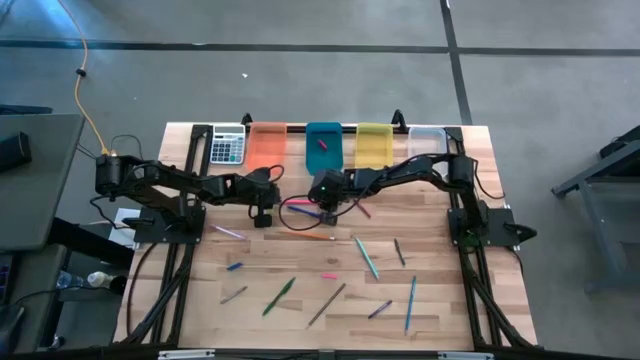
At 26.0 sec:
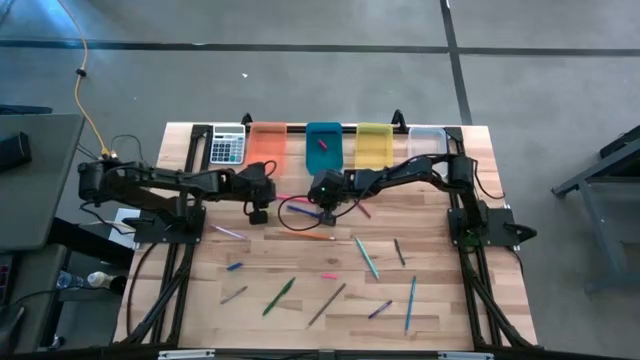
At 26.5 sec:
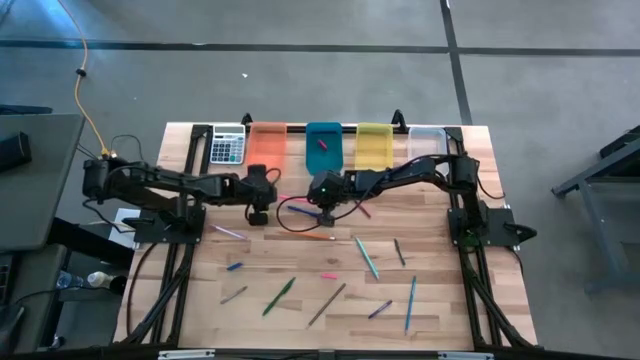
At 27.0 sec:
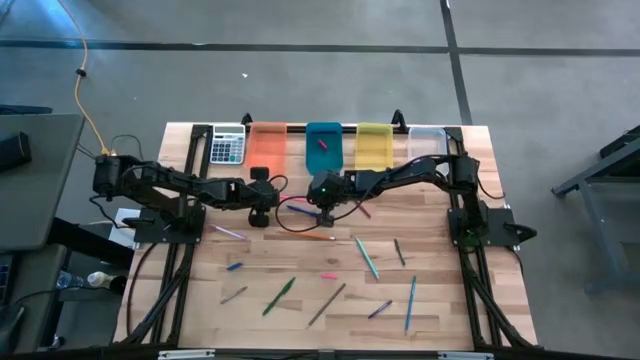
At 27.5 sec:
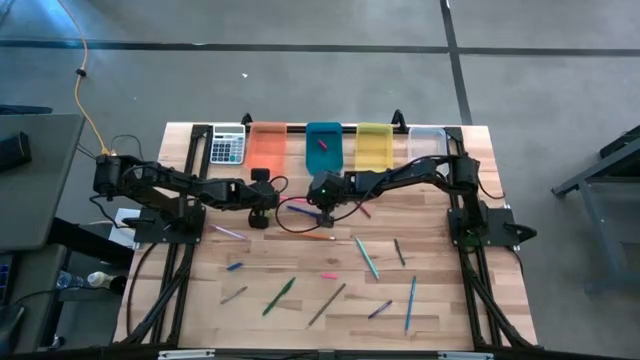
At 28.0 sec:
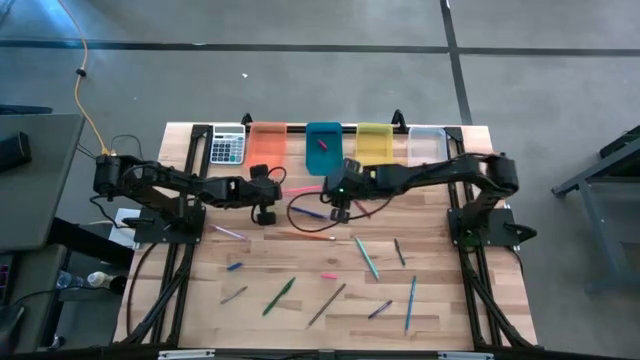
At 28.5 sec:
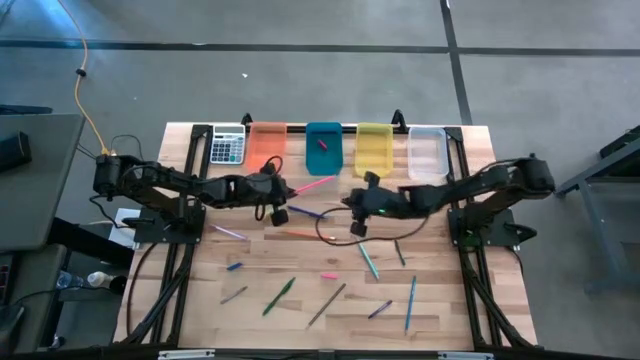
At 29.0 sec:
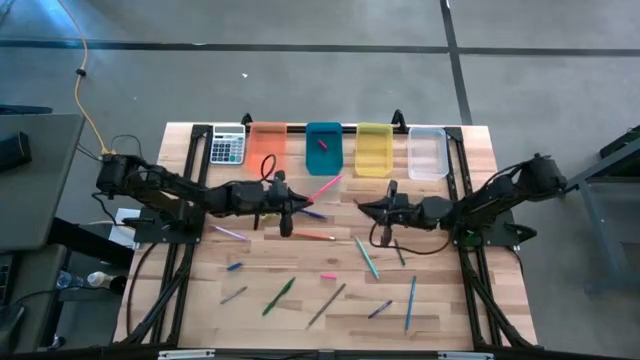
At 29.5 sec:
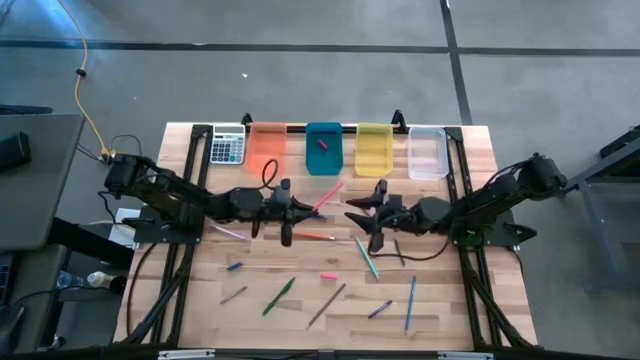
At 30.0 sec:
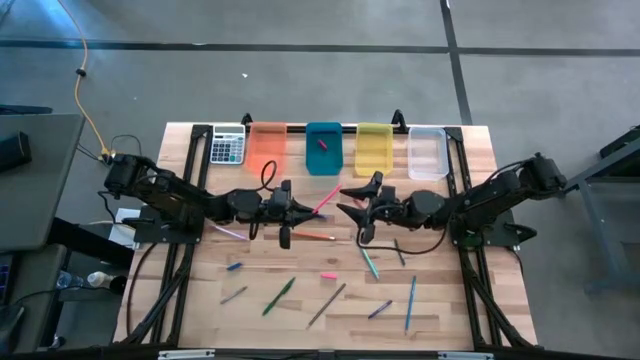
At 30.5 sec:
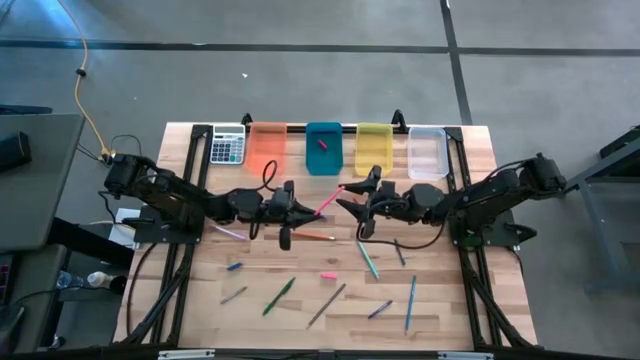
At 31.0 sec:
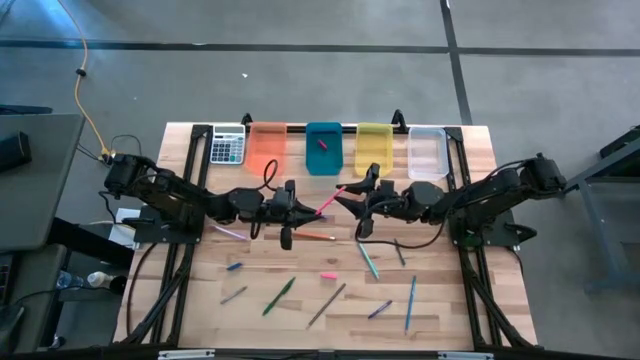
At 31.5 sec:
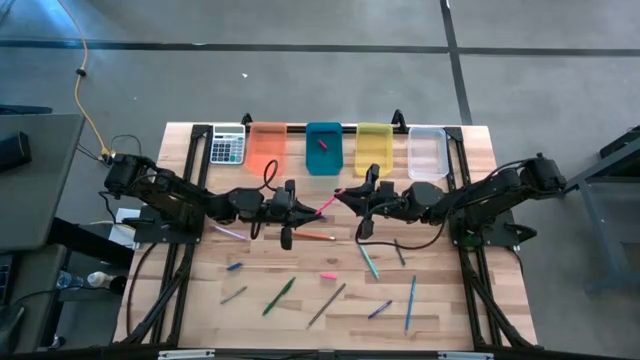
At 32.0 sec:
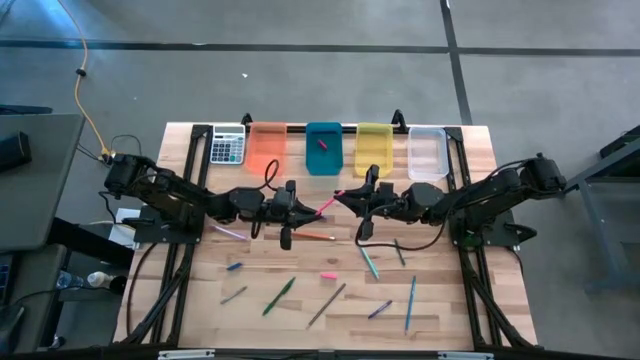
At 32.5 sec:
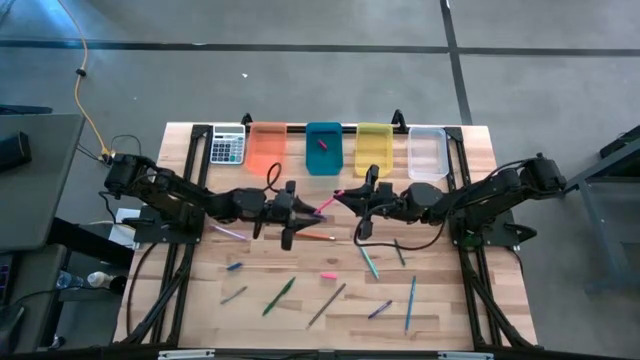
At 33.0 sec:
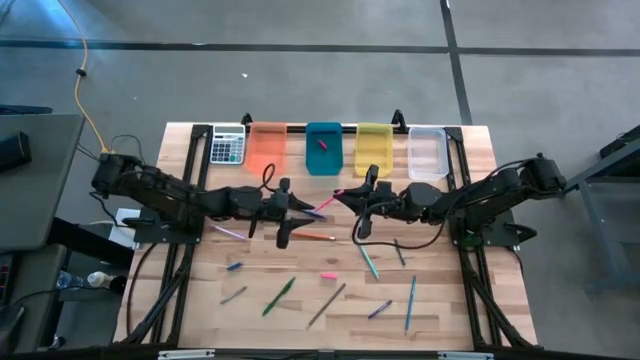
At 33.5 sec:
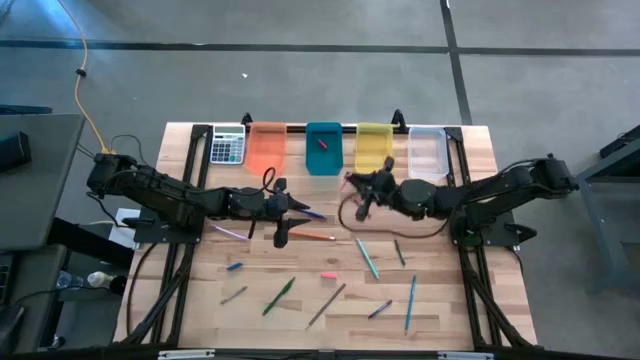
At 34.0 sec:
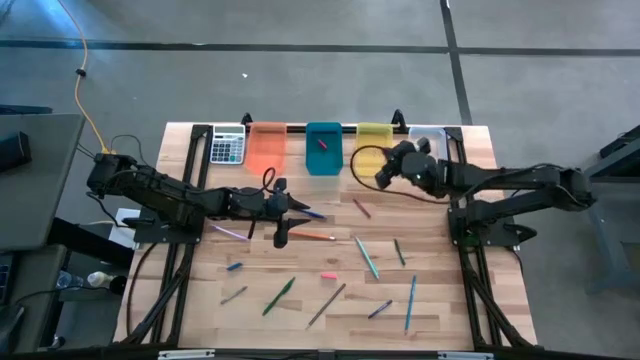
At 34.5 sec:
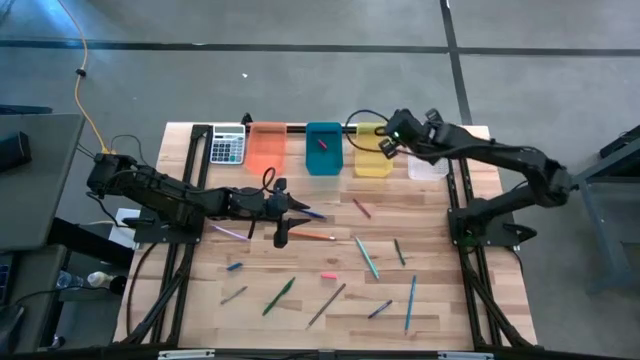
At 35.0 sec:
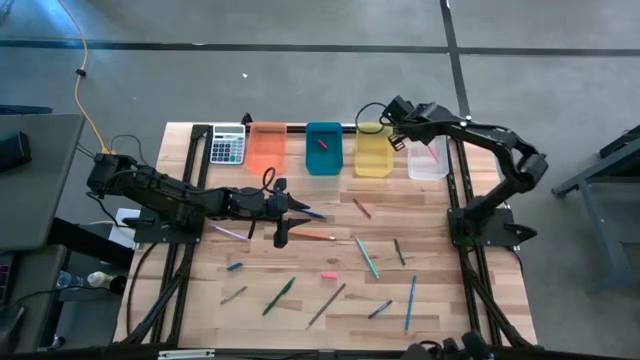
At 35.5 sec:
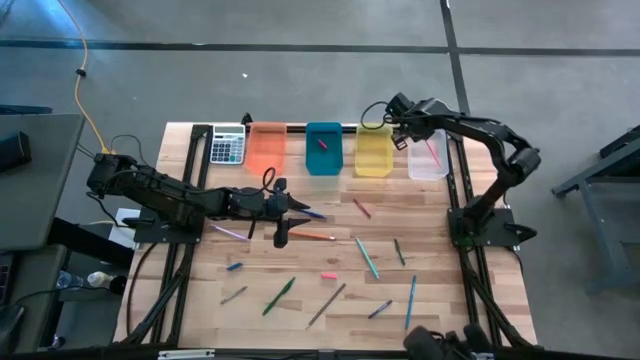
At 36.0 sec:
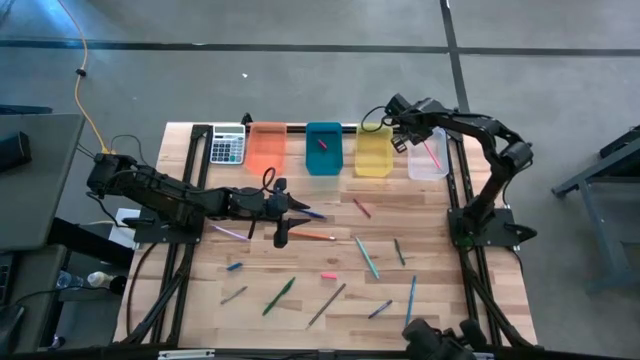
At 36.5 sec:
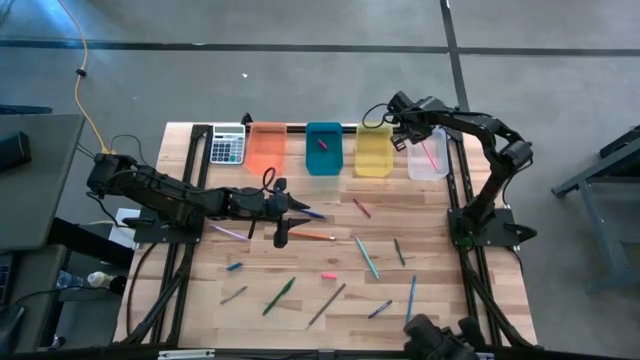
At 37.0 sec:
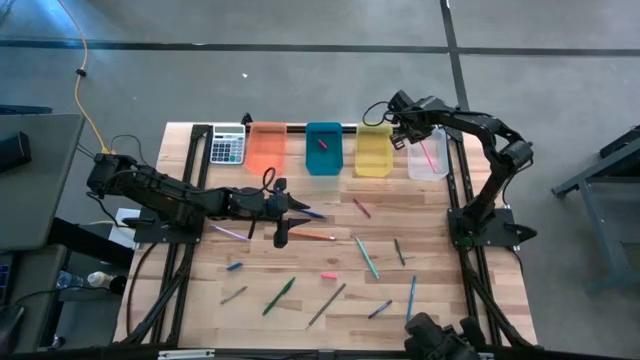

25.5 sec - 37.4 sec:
Task: Sort crayons/erasers/pens/pencils in bins
Put the pink pencil into the transparent bin

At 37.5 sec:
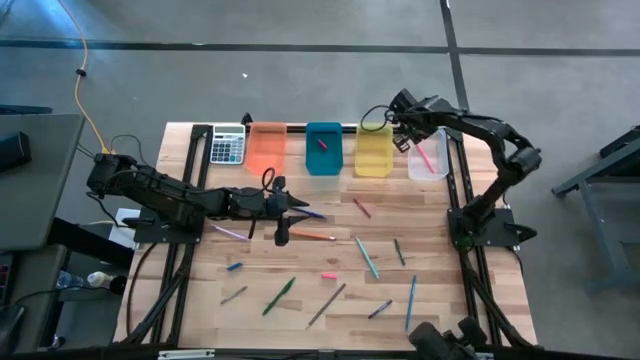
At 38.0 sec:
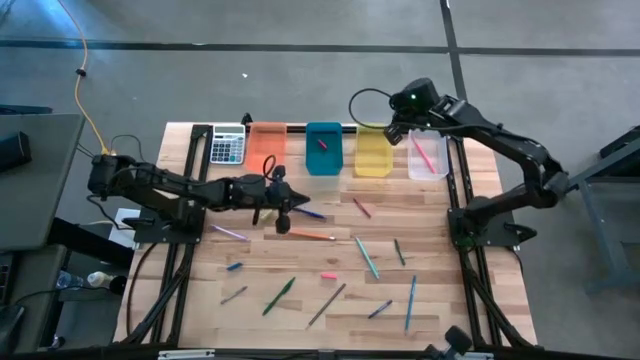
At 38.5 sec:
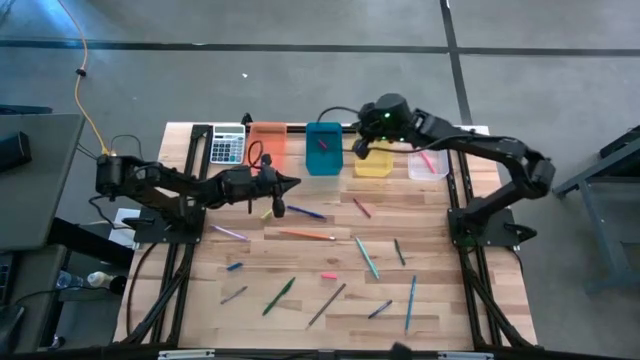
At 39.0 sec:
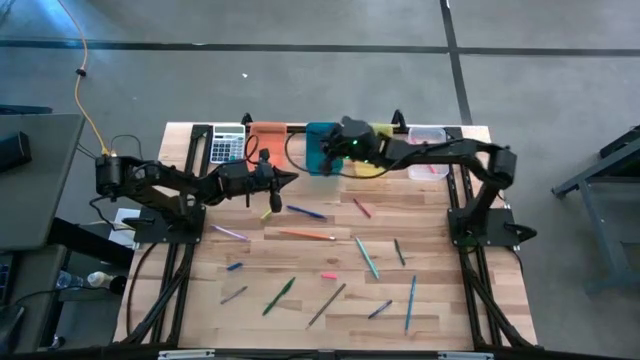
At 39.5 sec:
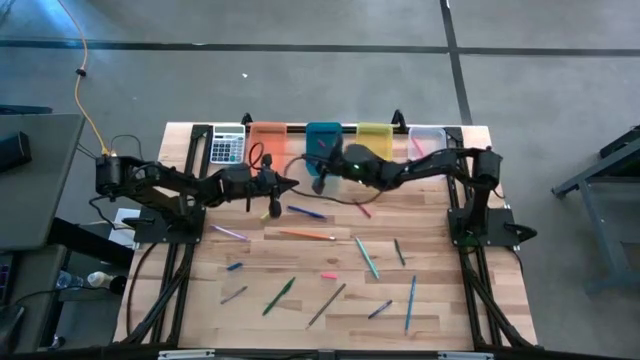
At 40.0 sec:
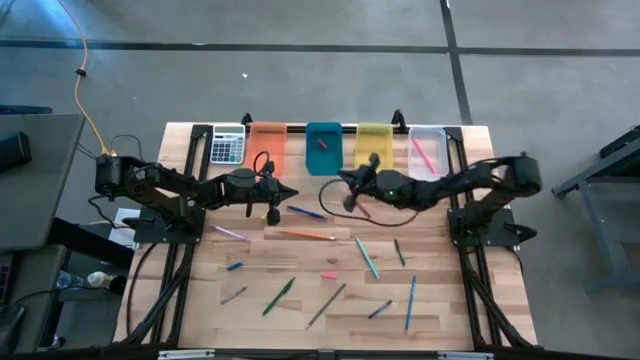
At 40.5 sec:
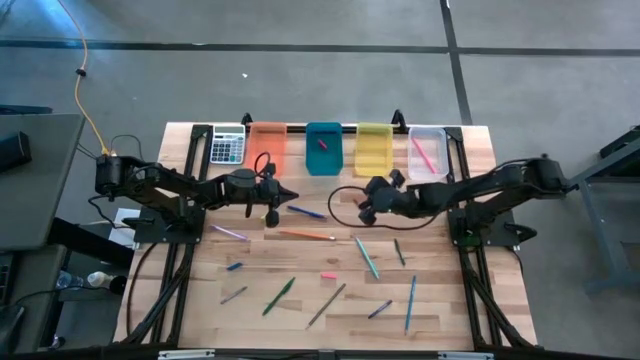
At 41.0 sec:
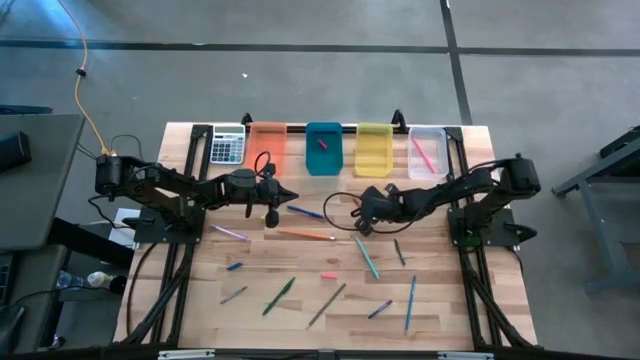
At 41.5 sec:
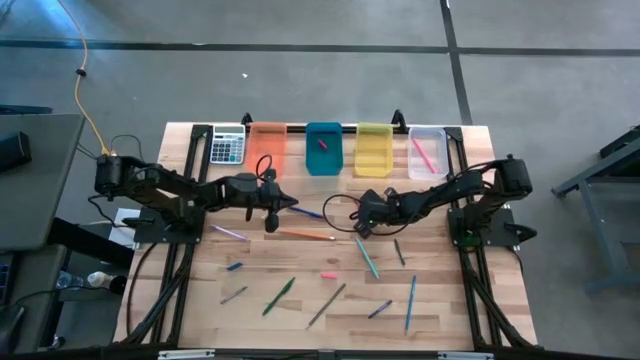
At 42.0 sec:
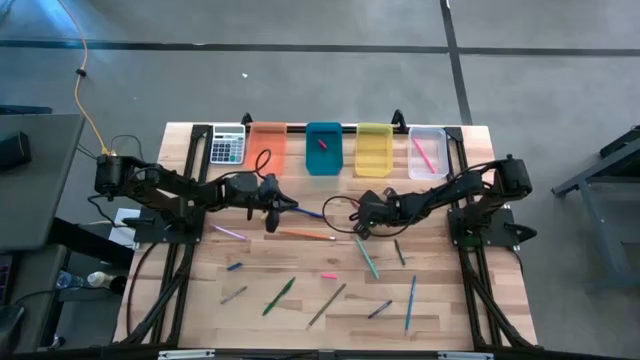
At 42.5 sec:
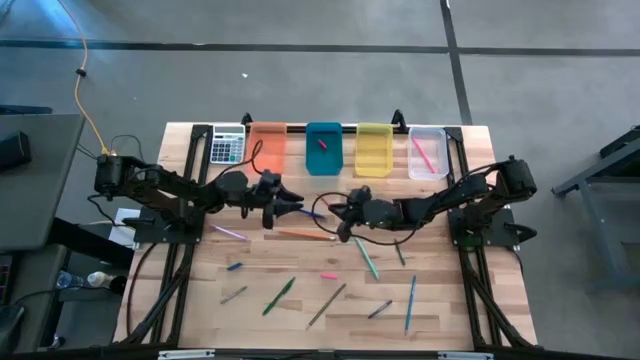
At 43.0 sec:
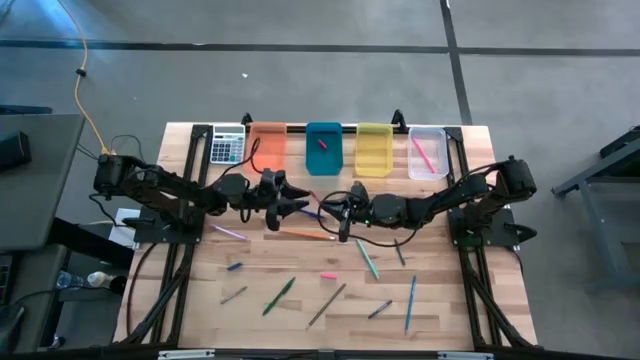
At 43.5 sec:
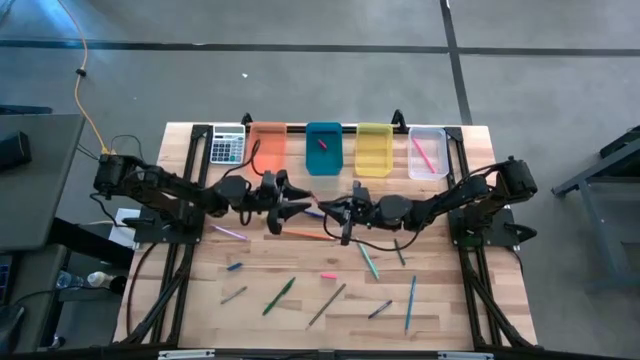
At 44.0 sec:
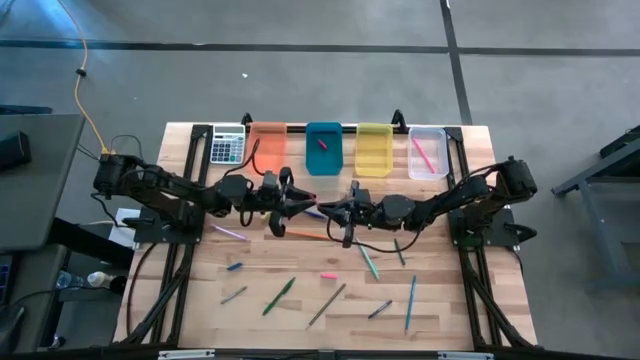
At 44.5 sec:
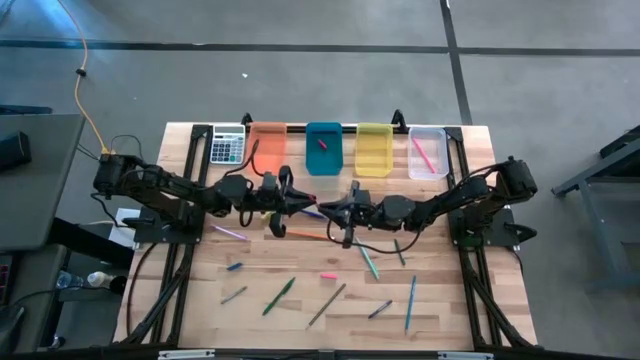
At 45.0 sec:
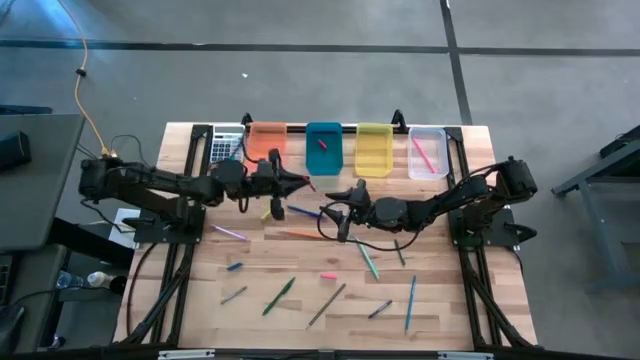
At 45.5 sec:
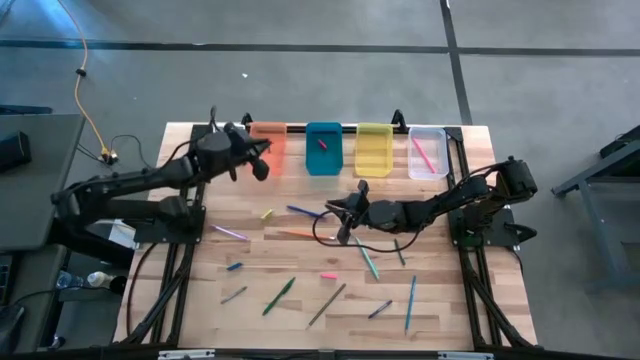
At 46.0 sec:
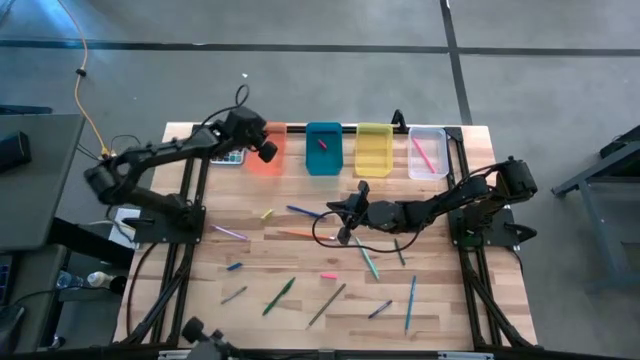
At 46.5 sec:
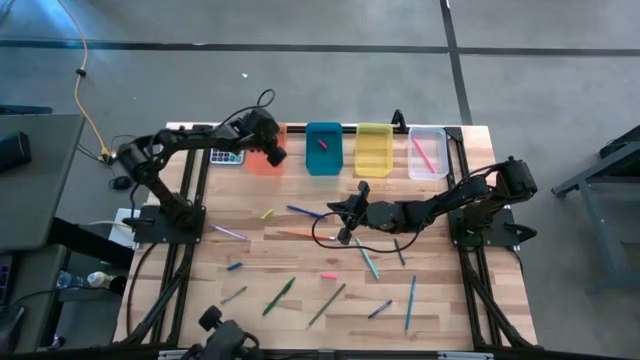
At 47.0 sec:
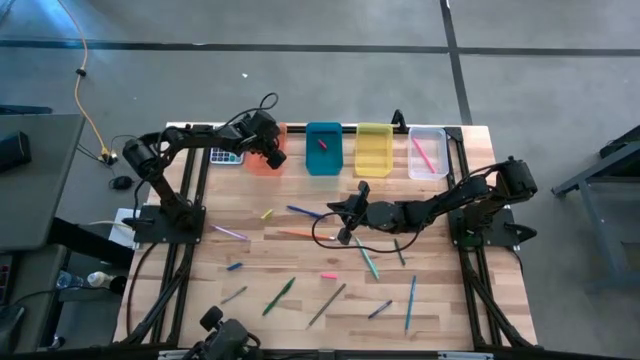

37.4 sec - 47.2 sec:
Put the red crayon into the orange bin
